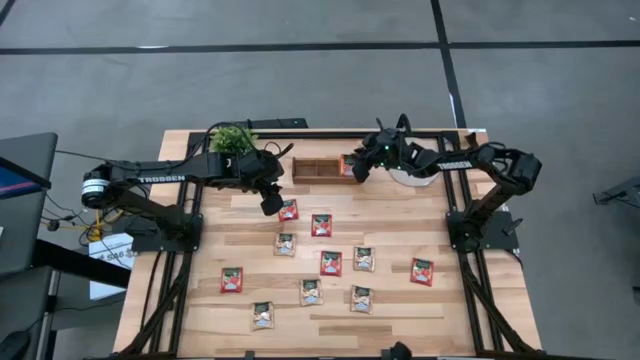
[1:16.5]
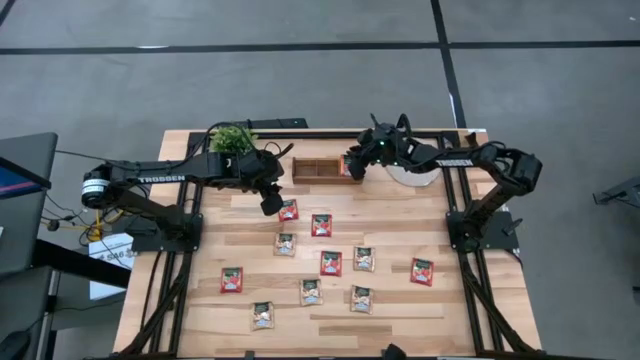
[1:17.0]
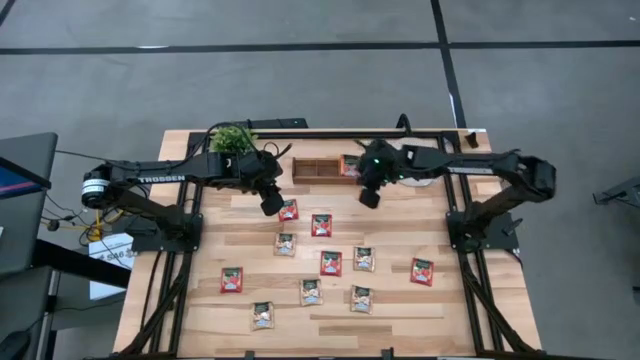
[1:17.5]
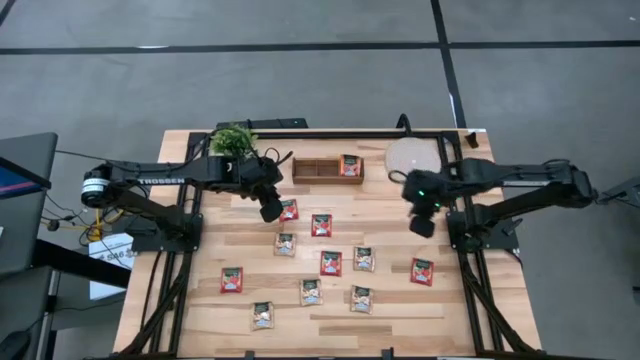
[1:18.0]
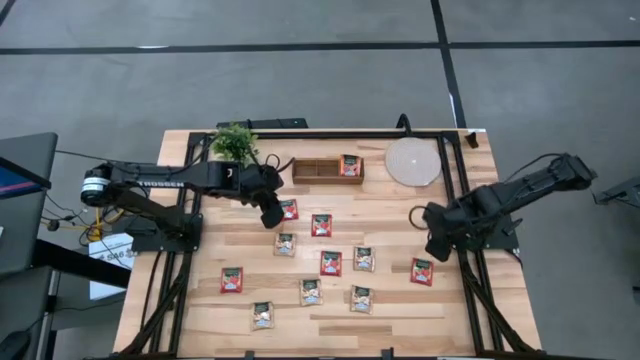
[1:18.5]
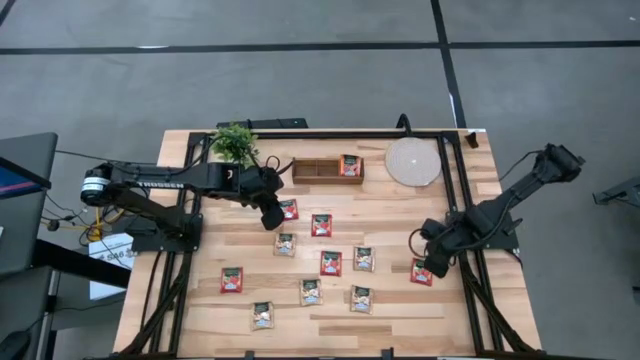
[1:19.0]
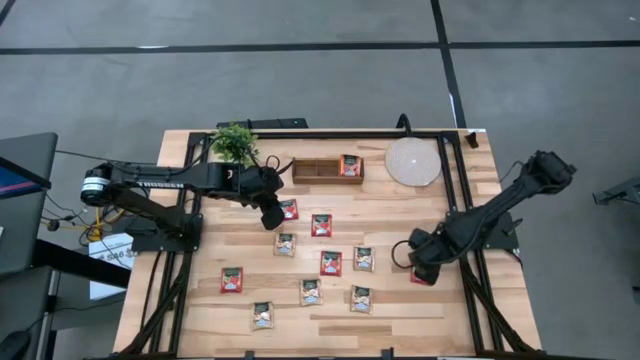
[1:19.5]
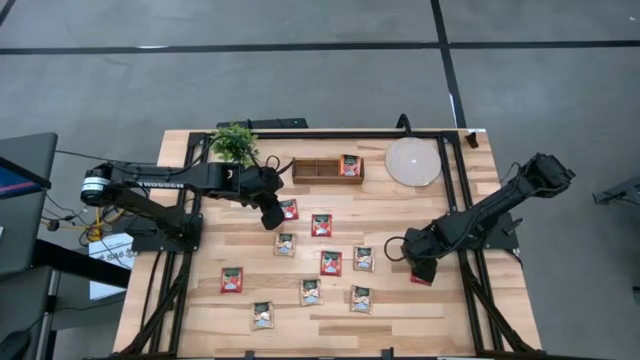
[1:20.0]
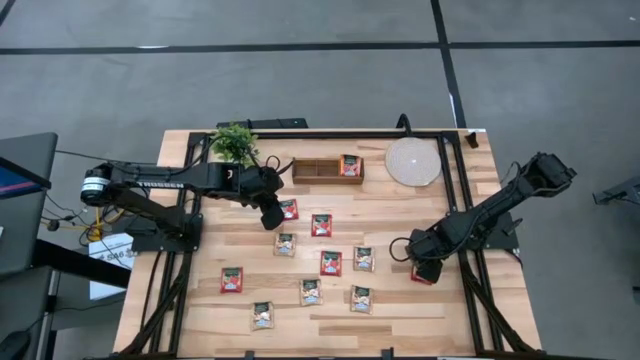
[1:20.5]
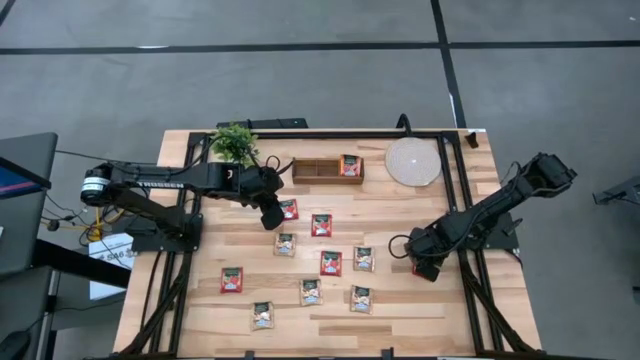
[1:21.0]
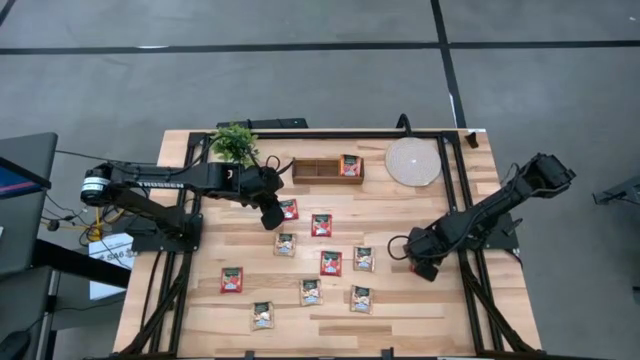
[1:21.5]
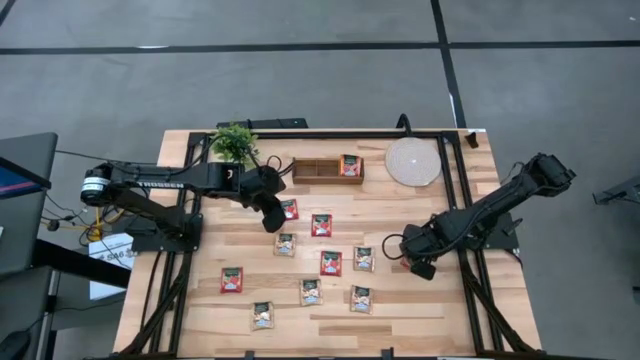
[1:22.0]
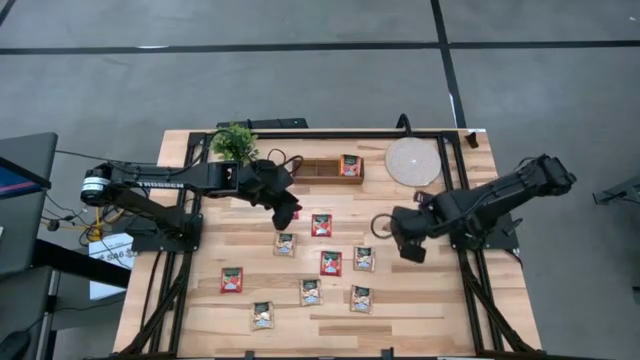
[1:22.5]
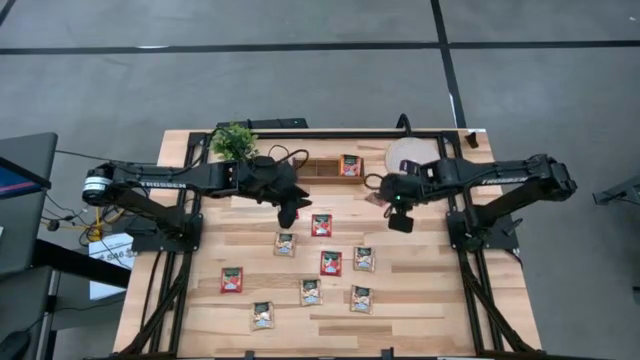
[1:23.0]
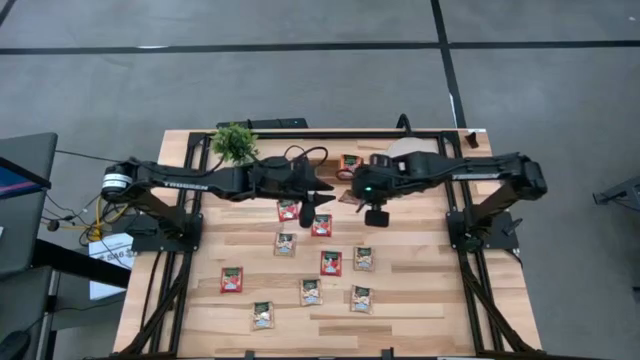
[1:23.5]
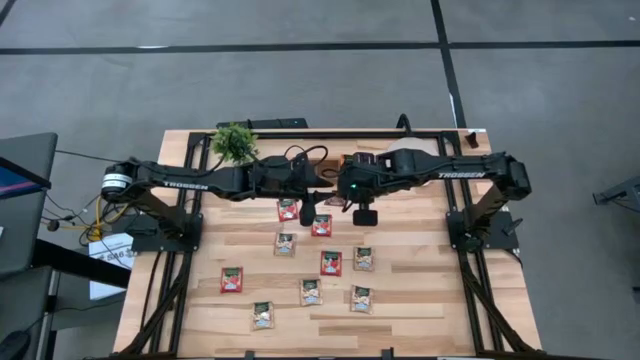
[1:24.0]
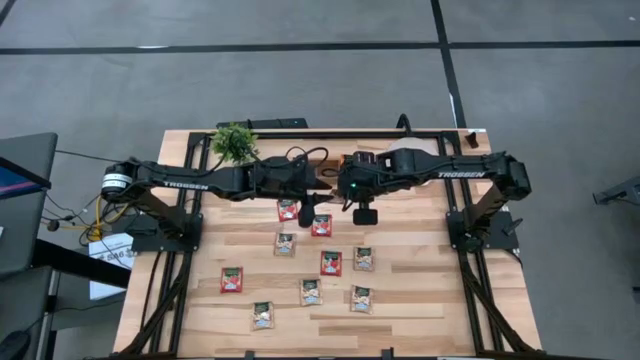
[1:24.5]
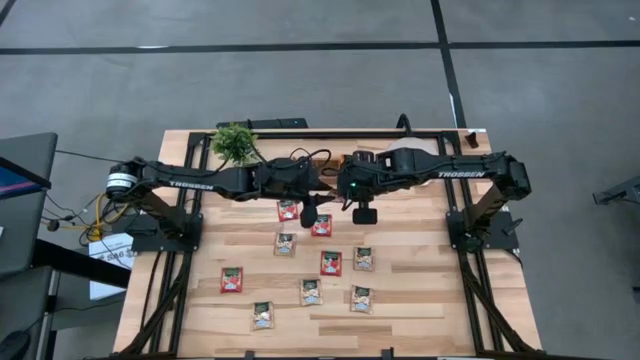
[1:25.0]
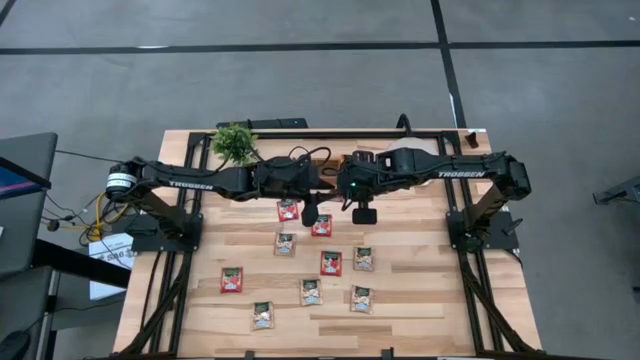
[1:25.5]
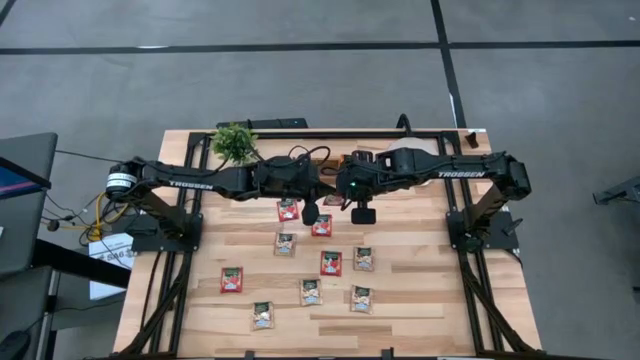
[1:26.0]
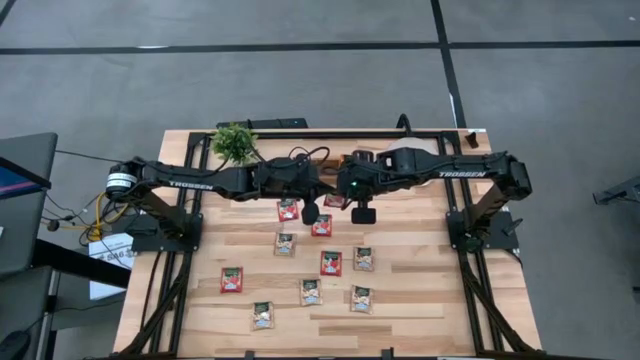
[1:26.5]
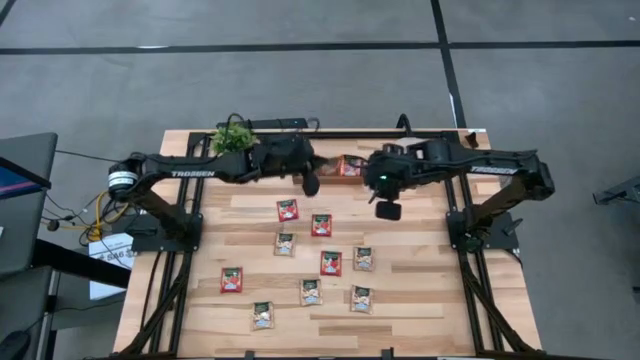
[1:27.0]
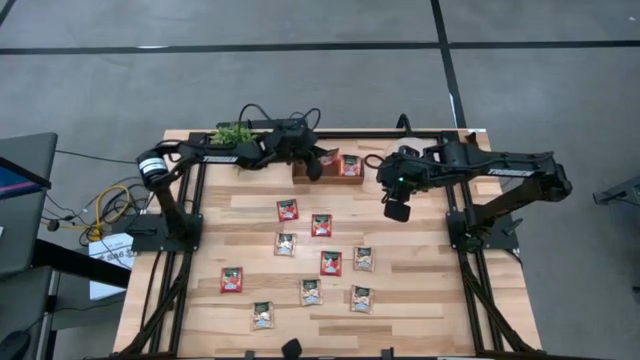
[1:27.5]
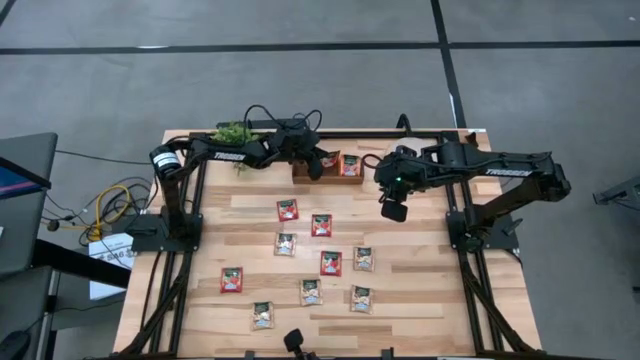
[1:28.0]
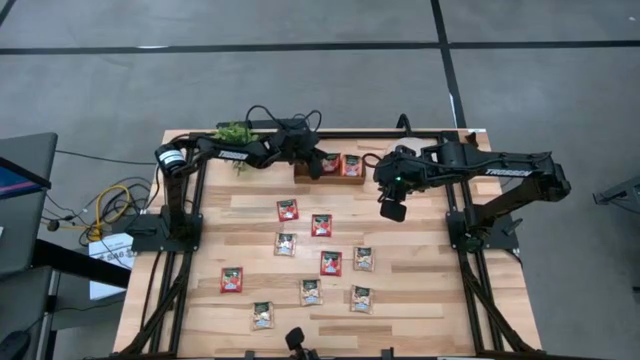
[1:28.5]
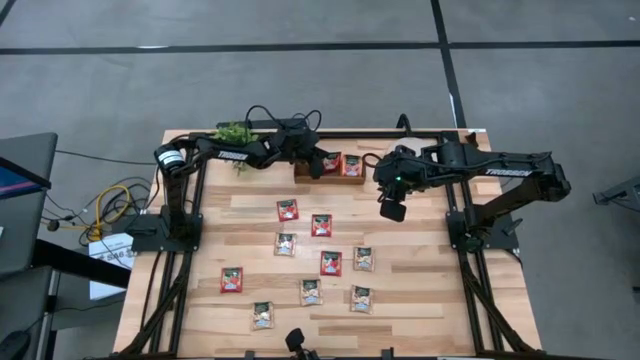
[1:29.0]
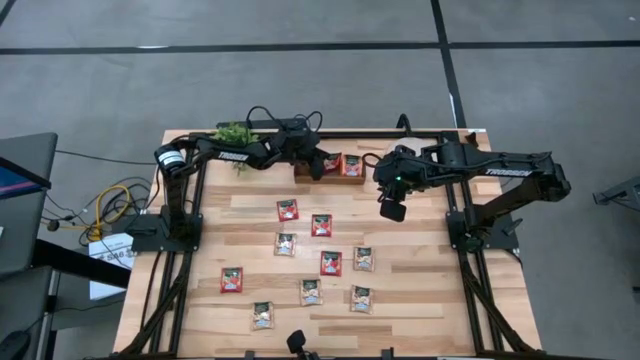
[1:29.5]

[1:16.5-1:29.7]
Task: Pick & Place Tea
Put the red tea bag into the middle section of the wooden organizer

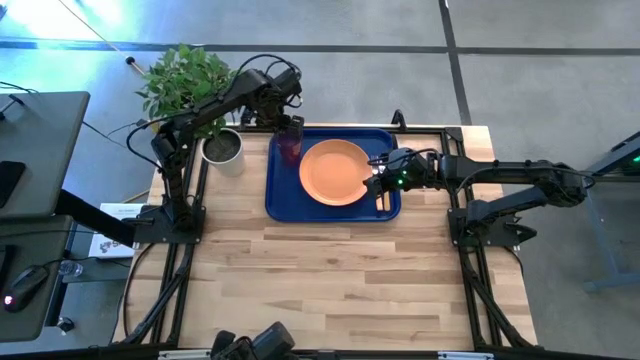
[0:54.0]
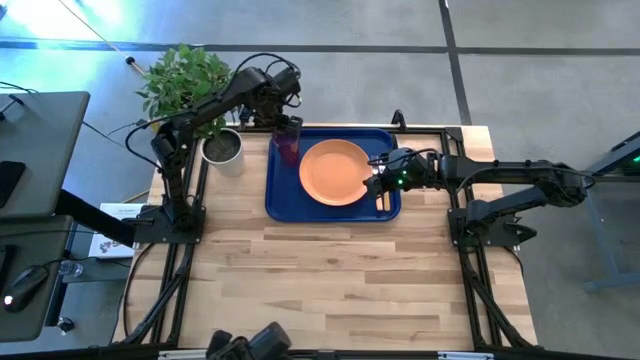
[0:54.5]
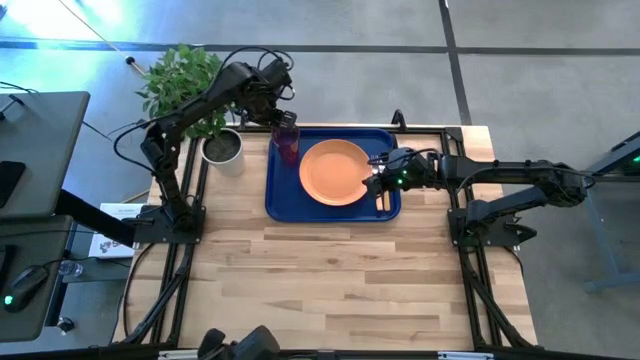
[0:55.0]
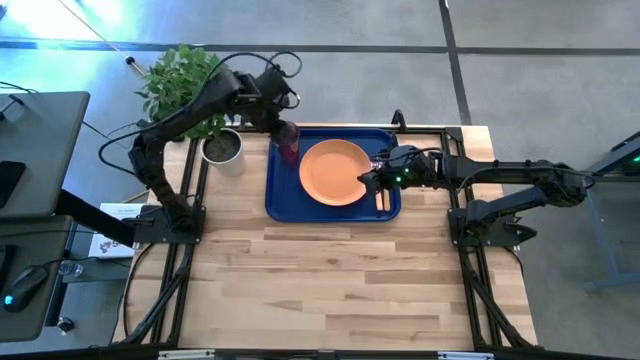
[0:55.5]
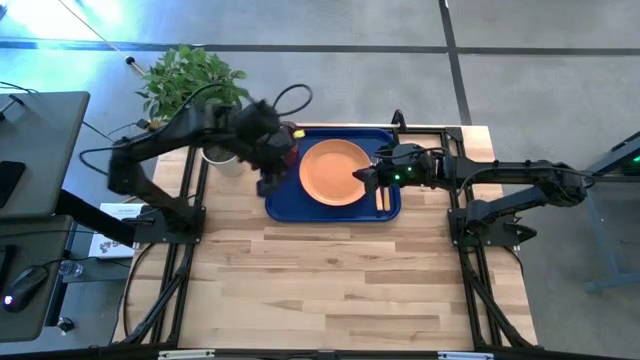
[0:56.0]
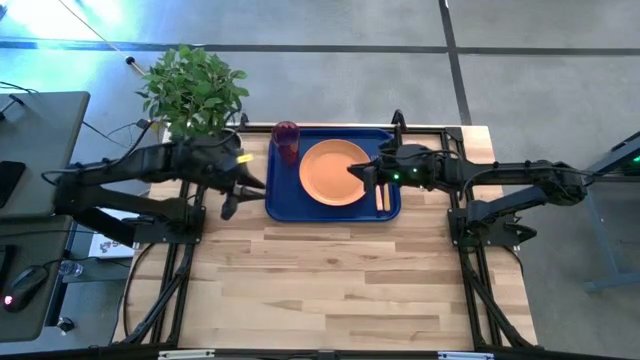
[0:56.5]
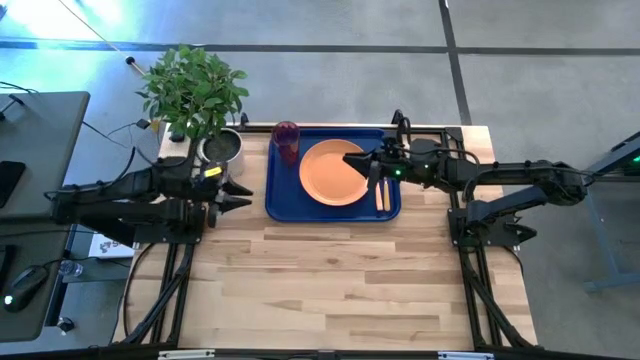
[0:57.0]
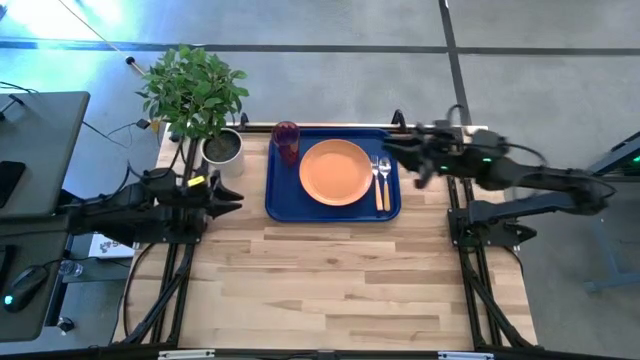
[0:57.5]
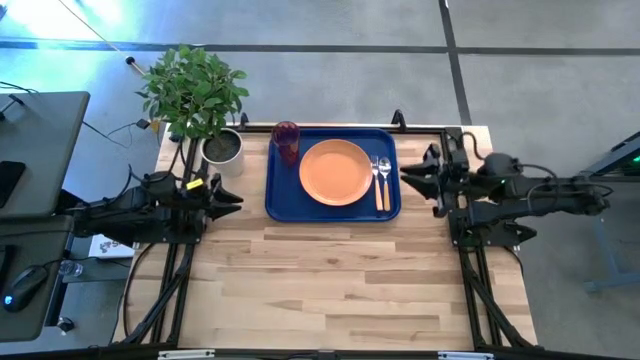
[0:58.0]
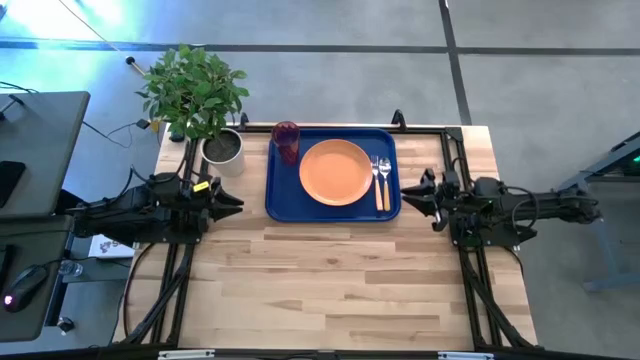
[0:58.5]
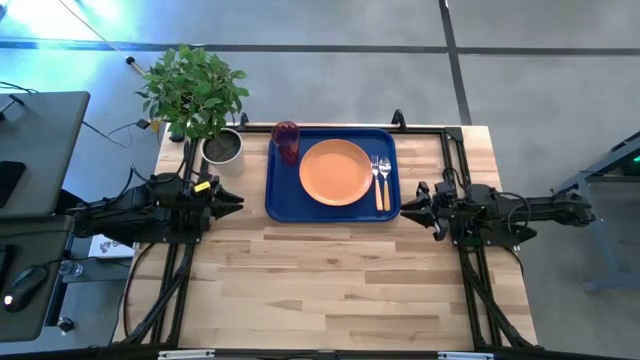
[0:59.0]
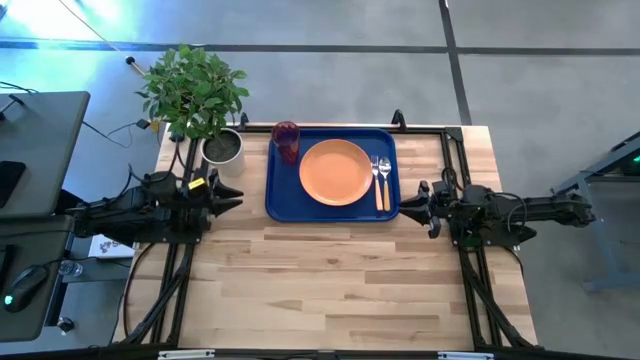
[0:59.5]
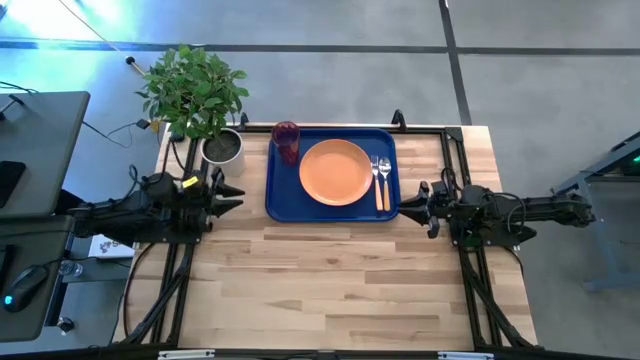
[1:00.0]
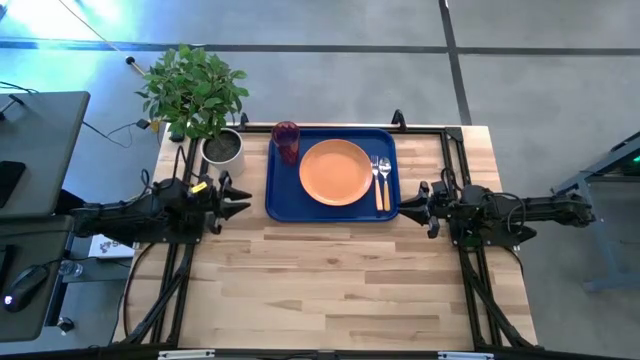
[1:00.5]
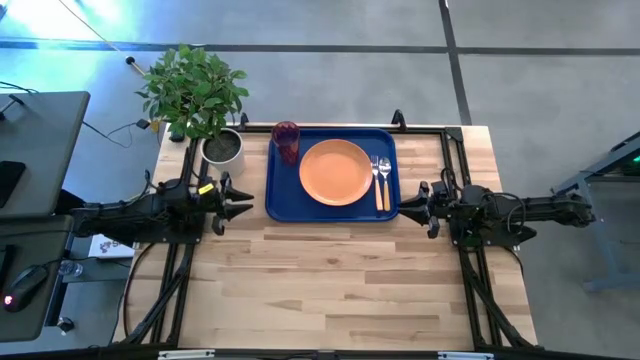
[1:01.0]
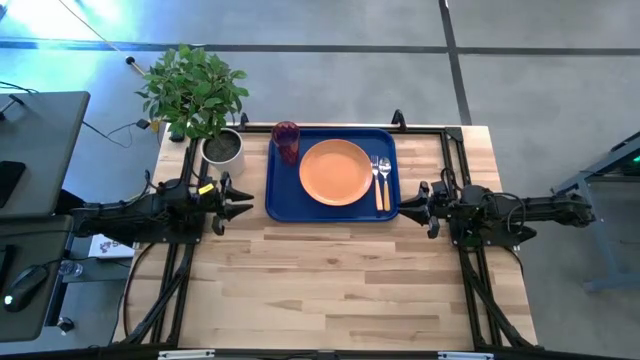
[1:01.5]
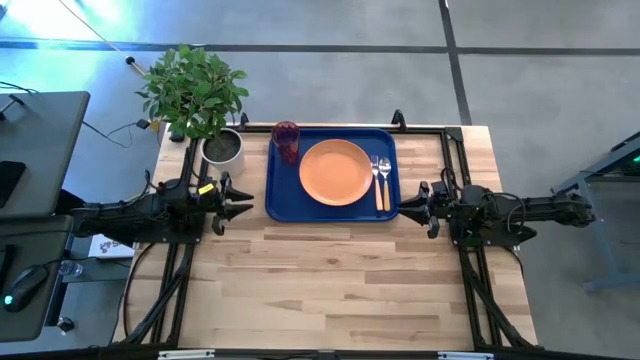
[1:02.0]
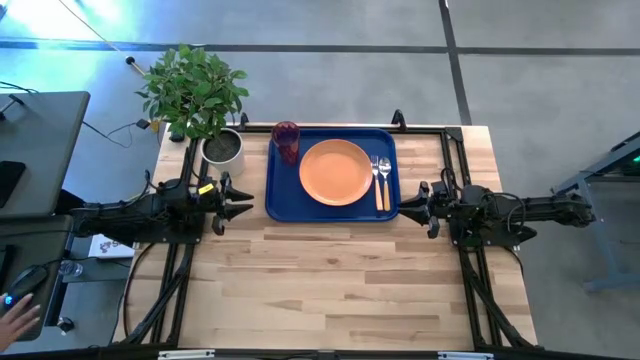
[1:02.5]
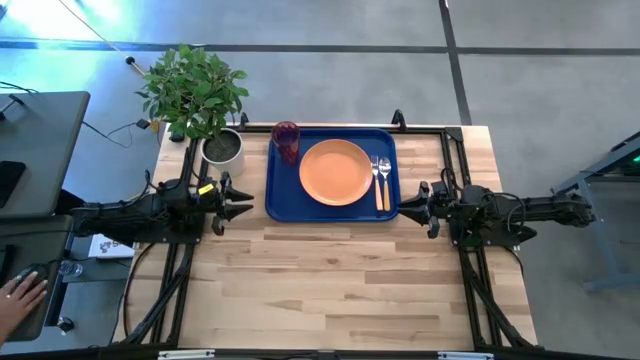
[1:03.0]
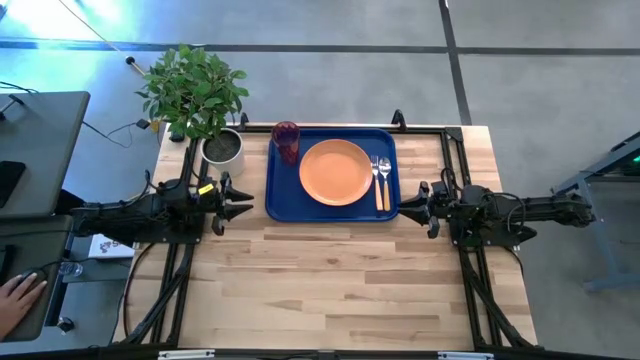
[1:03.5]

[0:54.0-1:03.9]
Task: Pick and place plate/cup/fork/spoon on tray
Return to Home Position
